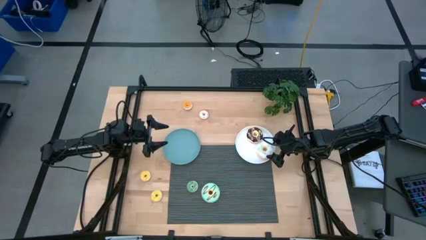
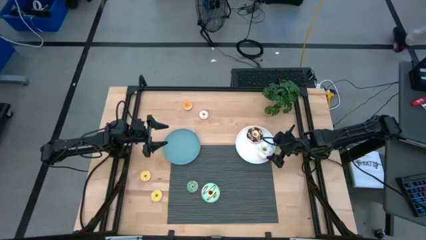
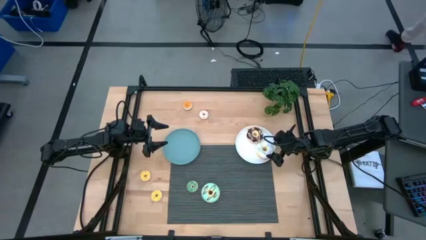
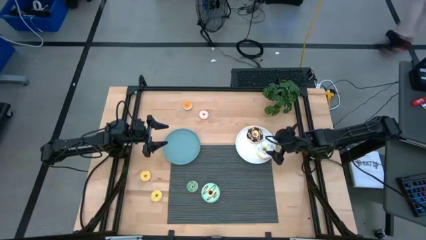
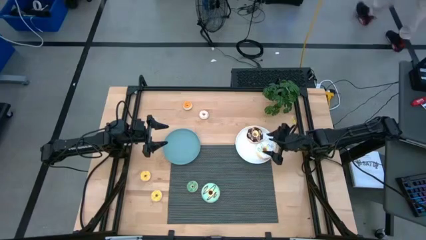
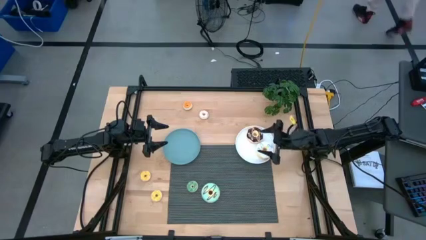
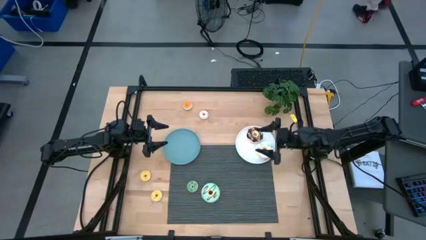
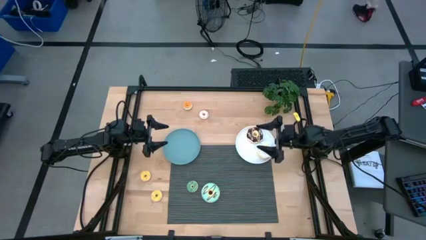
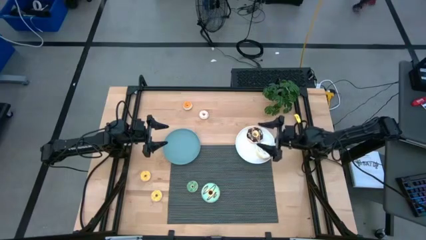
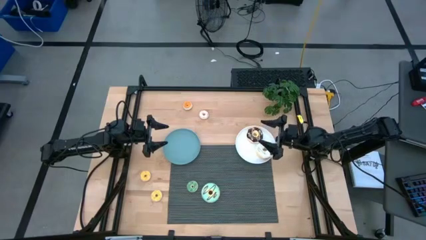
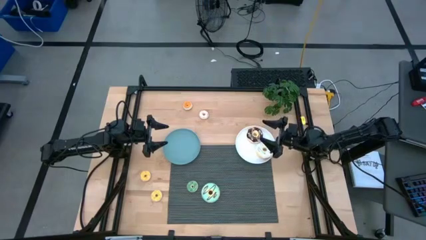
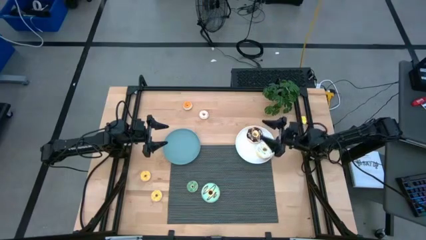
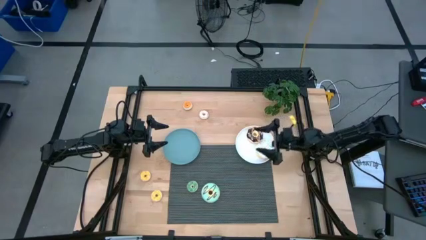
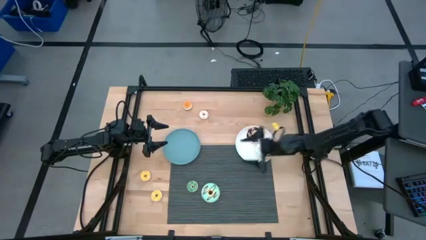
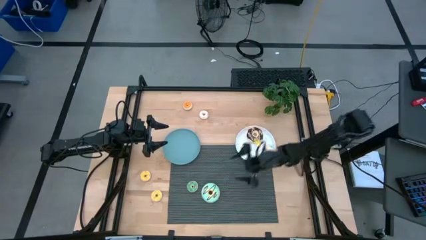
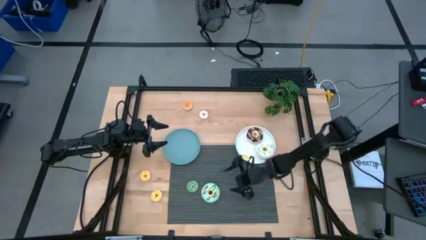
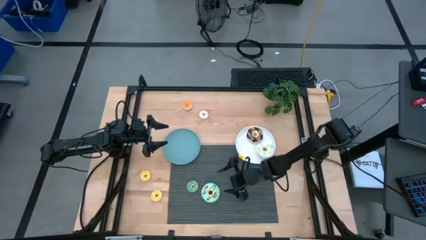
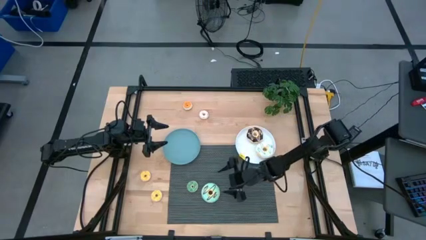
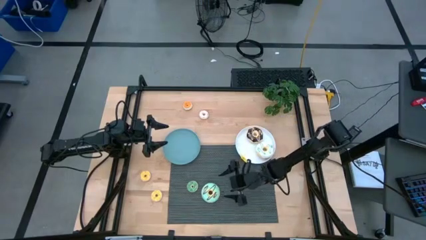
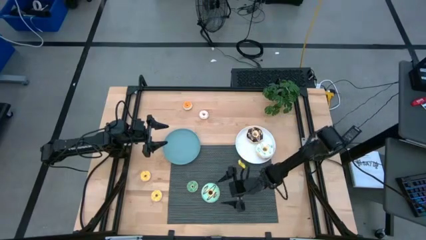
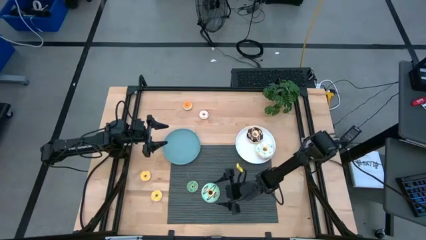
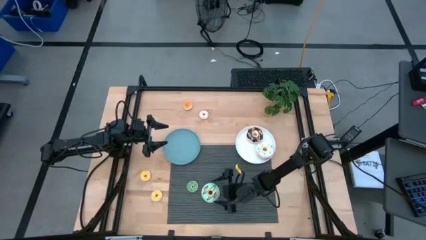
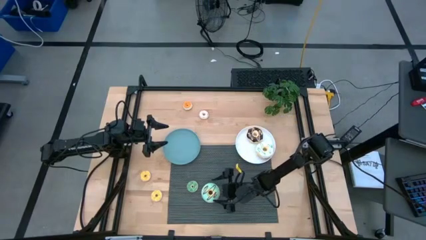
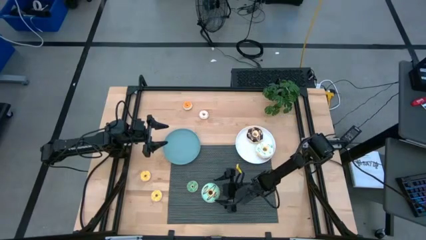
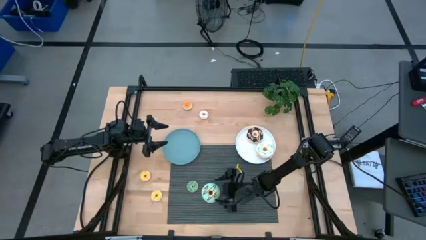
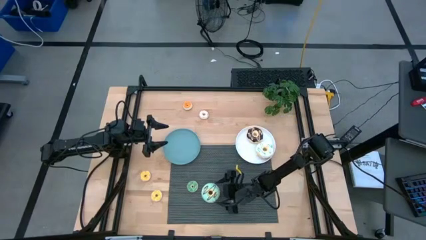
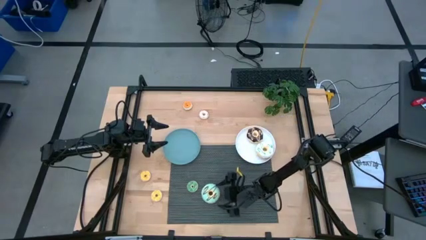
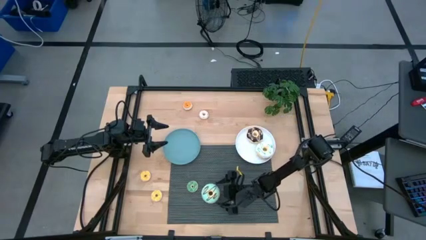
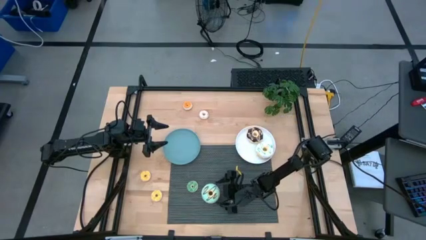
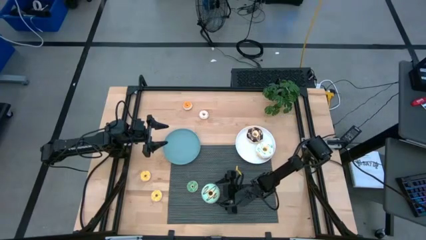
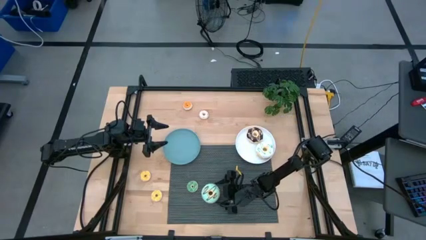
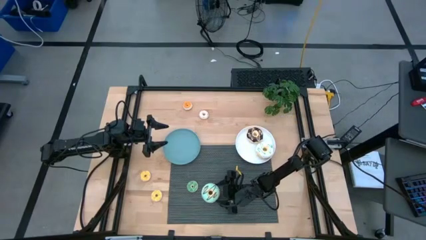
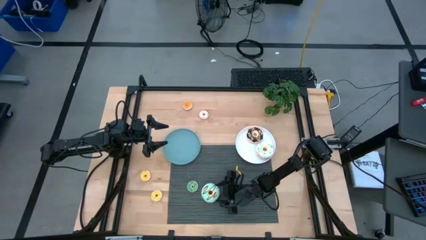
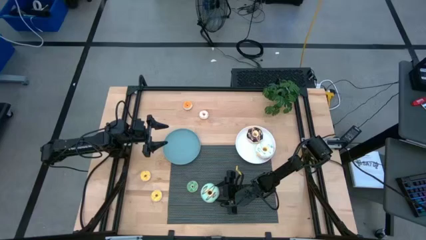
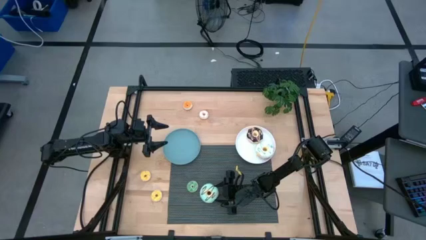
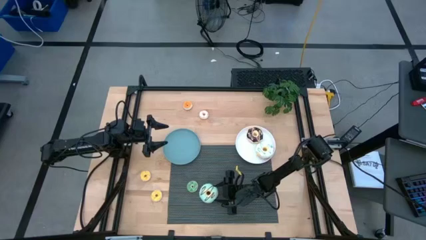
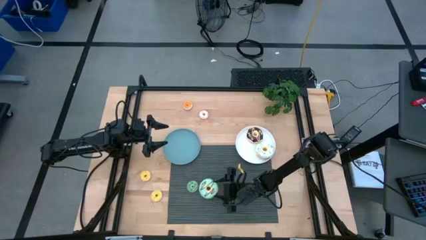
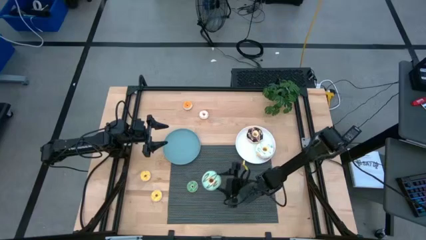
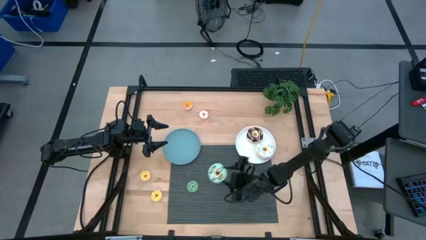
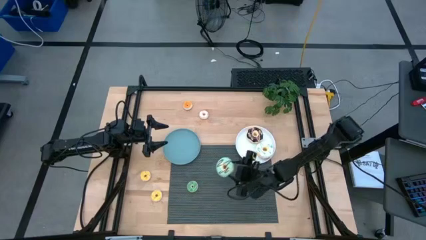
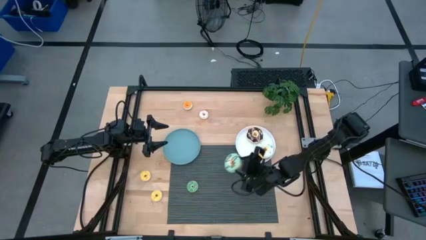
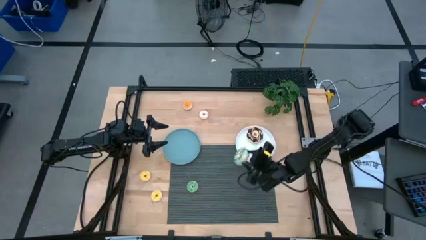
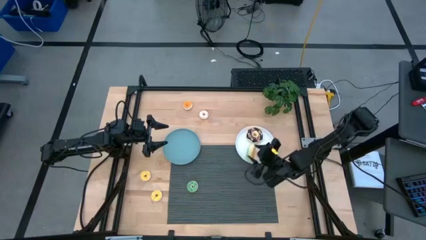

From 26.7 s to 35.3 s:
Task: Pick & Place donuts
Put the large blue donut on the white plate

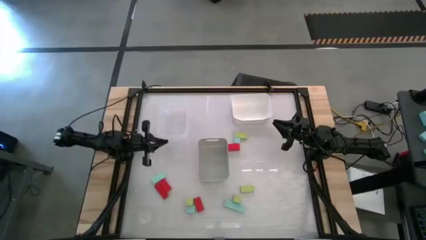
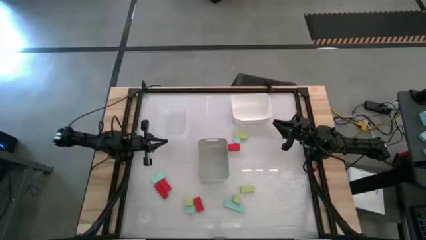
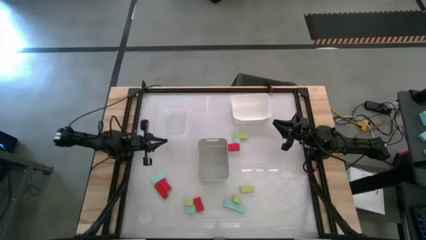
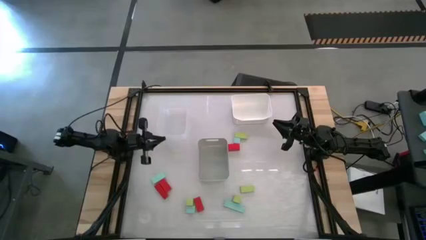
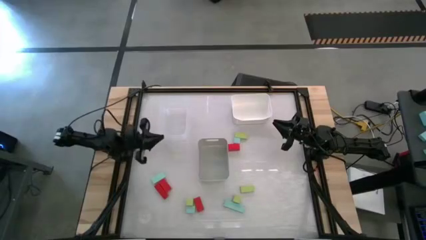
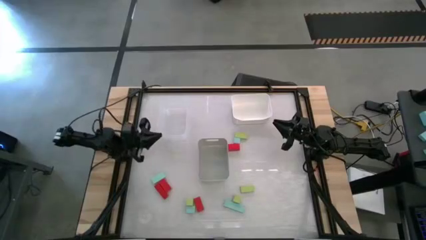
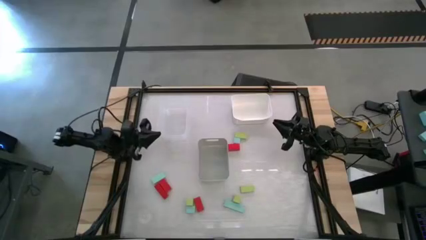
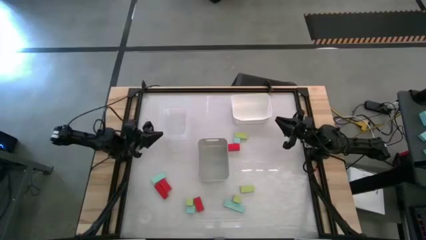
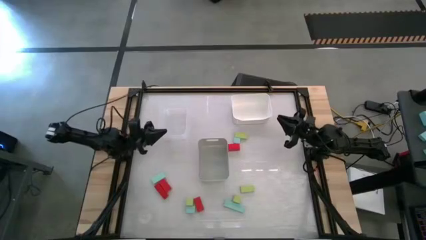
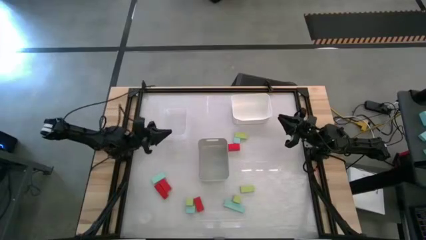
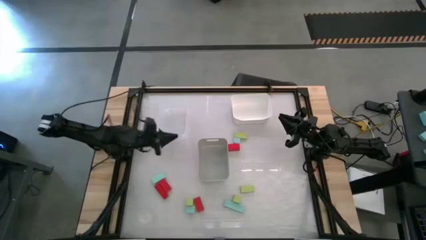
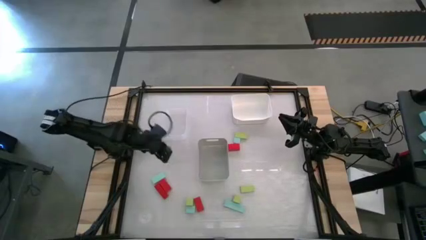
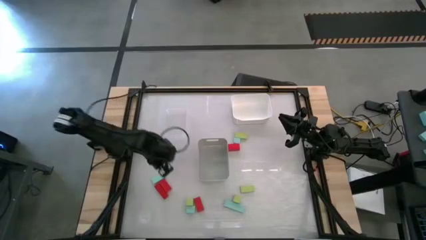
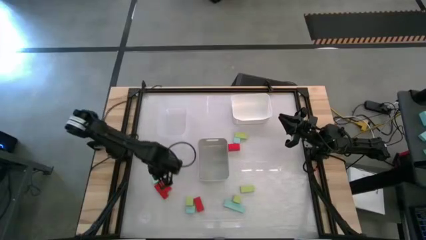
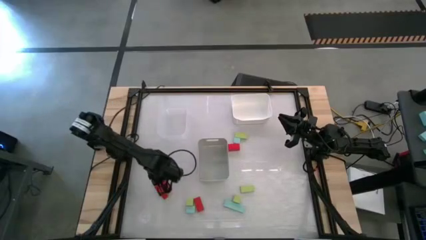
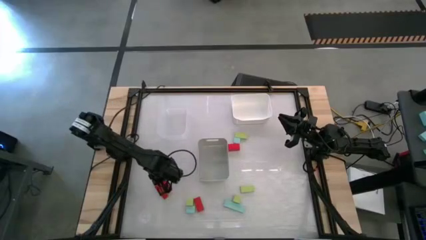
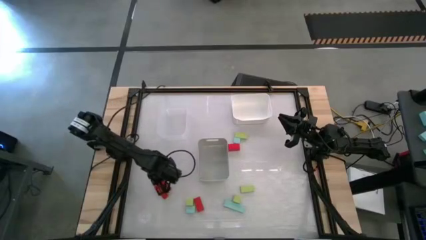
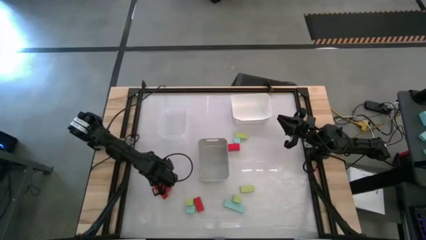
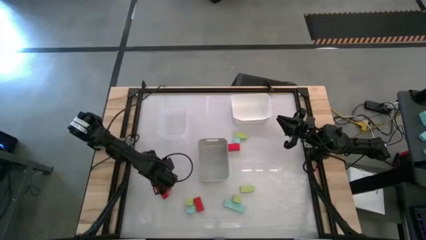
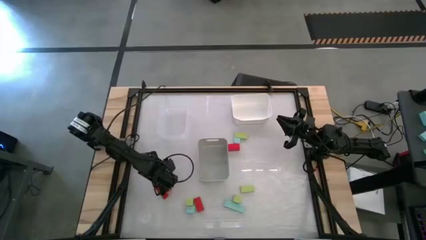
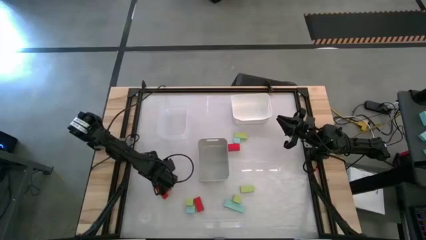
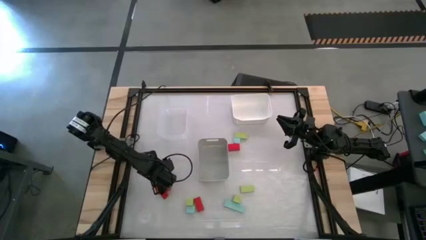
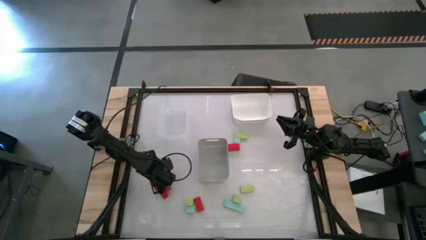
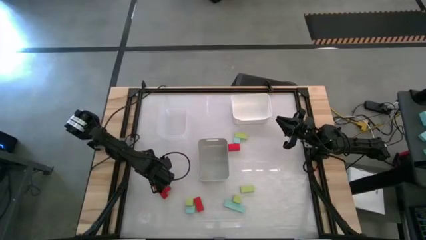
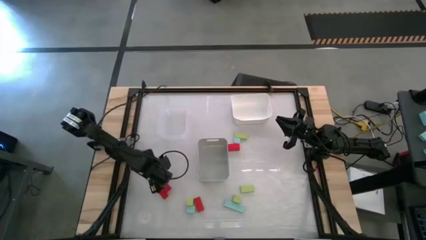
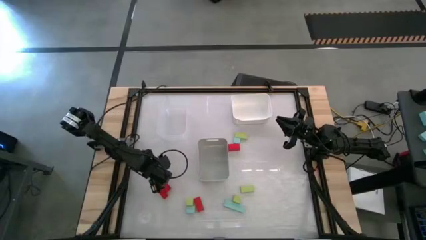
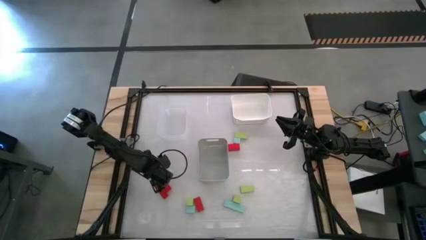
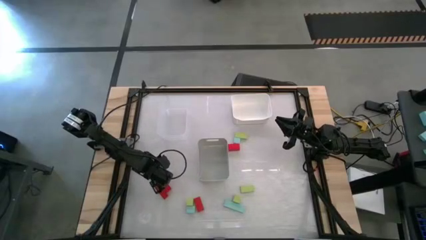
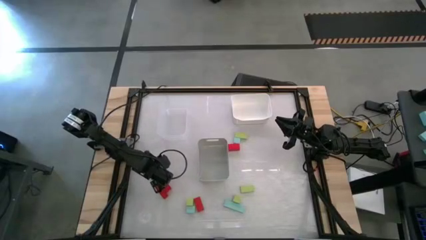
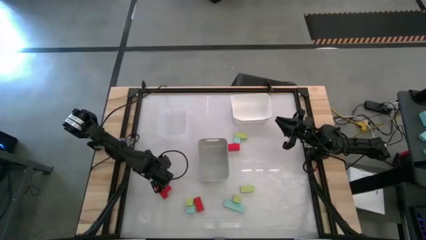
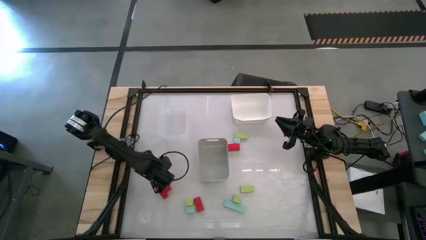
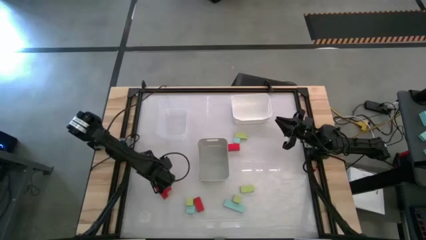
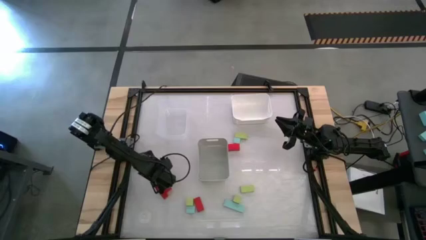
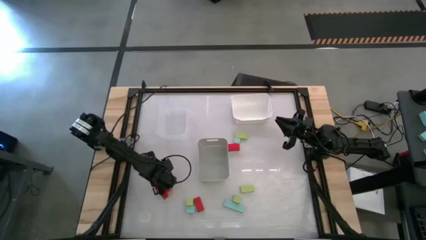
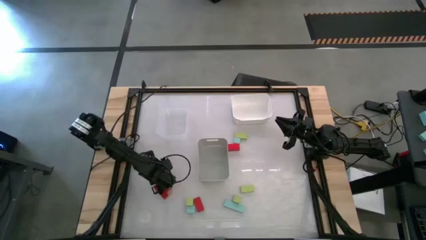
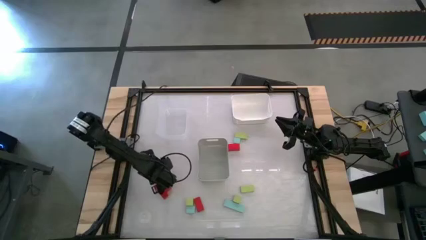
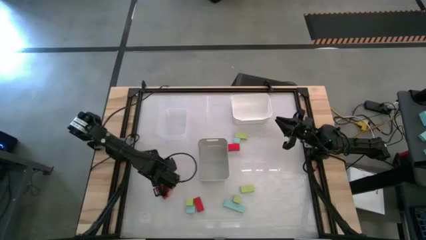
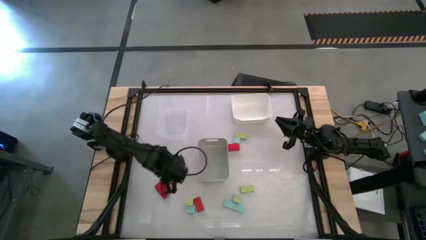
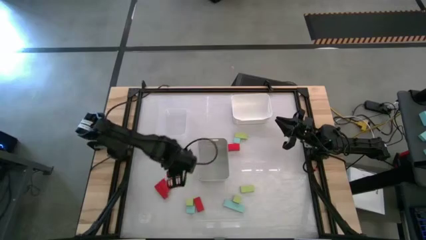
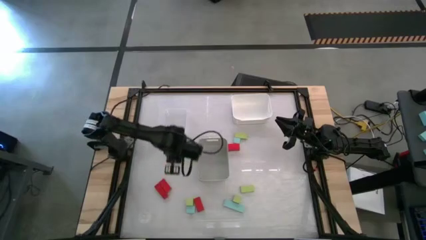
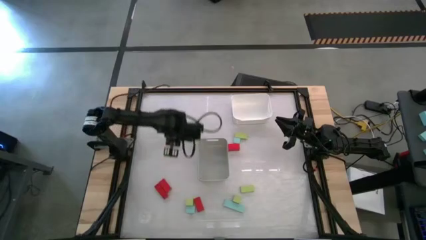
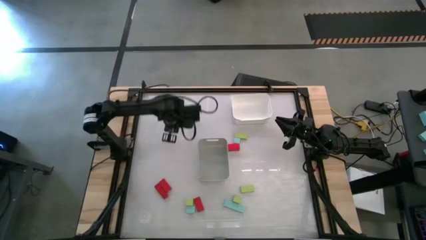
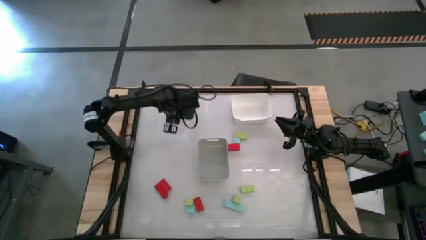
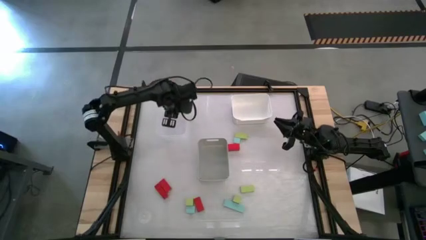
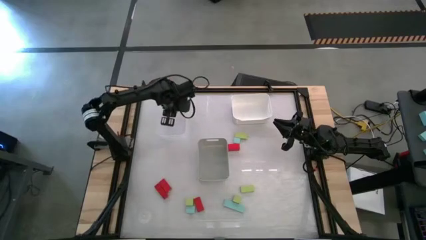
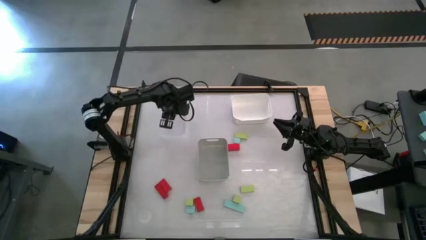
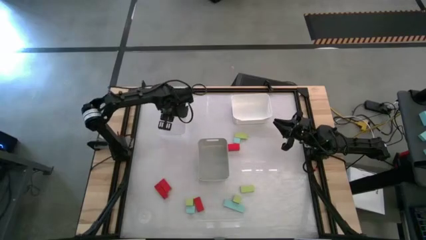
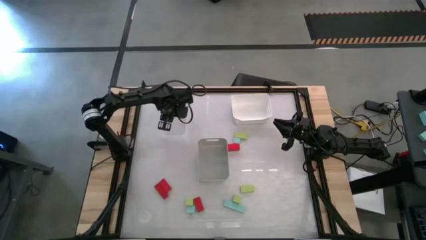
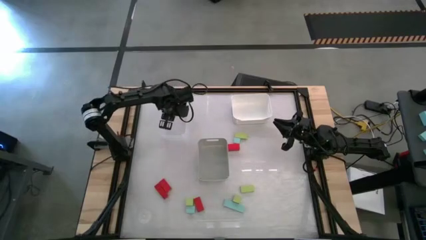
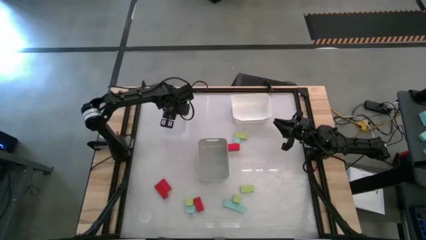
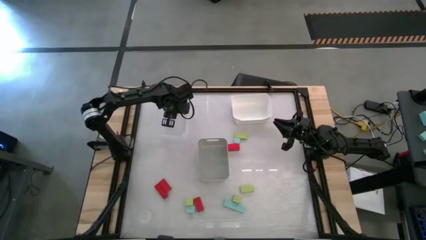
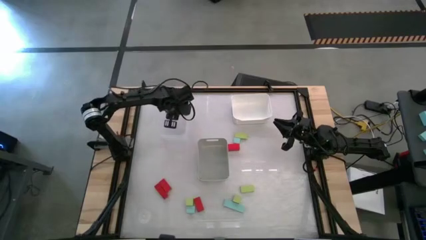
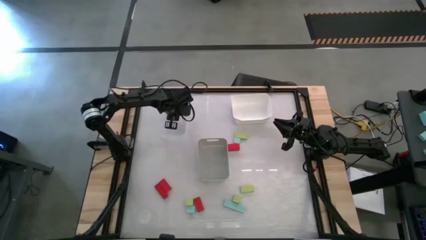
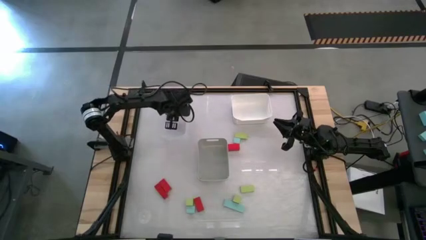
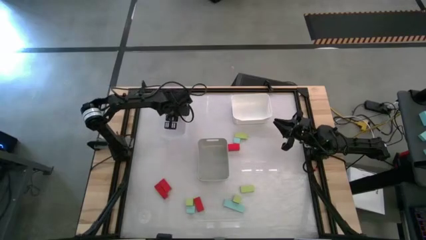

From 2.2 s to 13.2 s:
Task: Sort & place blocks by color
Put the blue block into the transparent bin
